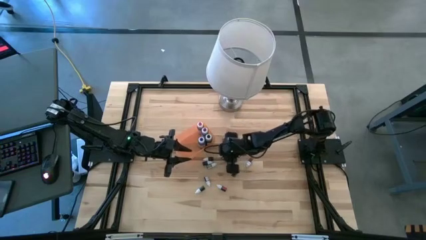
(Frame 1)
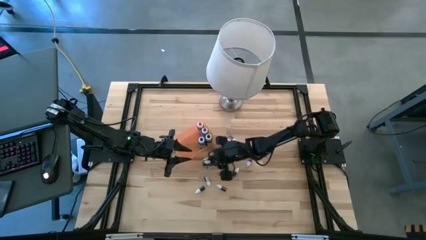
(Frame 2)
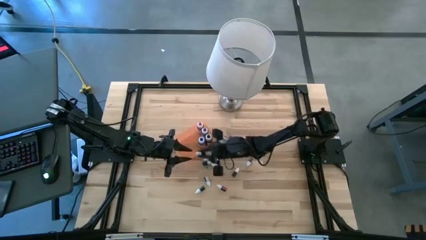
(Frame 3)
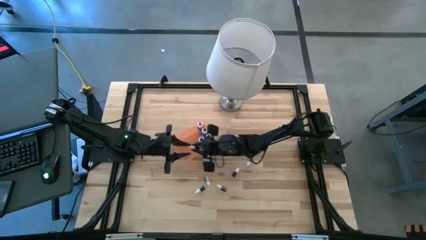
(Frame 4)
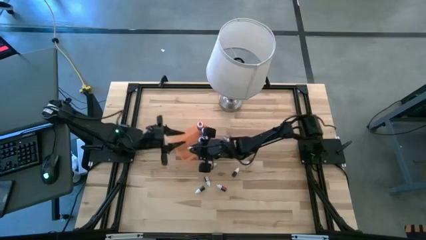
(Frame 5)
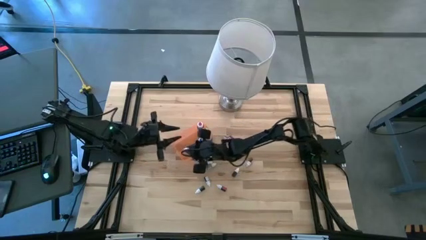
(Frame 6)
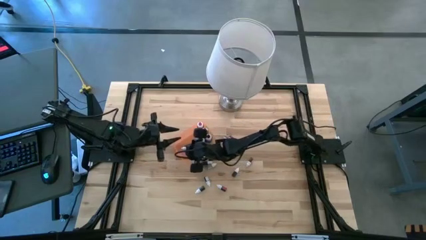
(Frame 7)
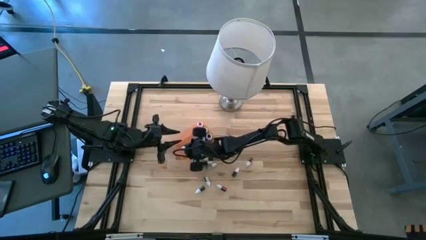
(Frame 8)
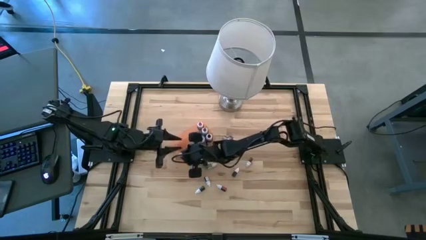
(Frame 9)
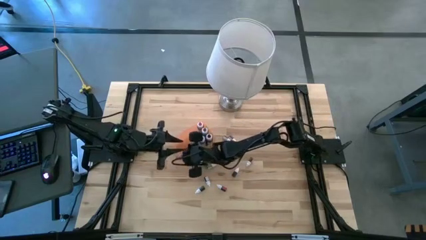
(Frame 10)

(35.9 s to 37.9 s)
Task: Pick & Place food coloring
Put the top small black food coloring bottle into the bin

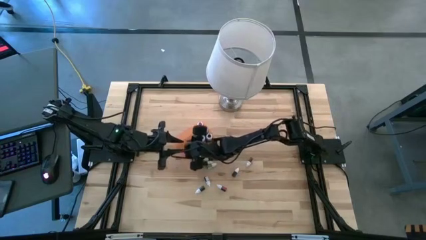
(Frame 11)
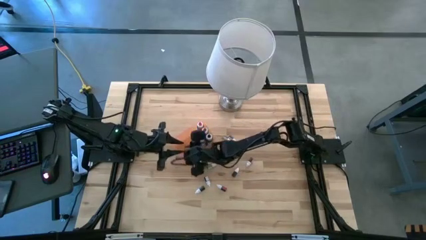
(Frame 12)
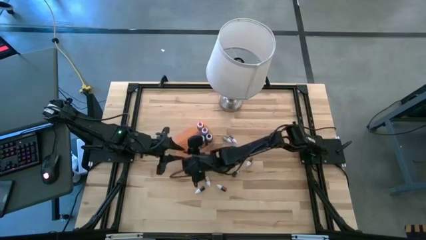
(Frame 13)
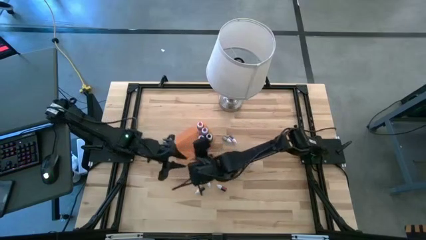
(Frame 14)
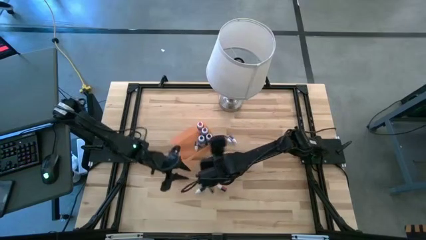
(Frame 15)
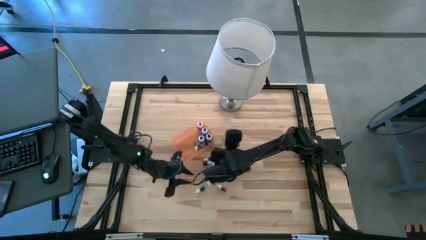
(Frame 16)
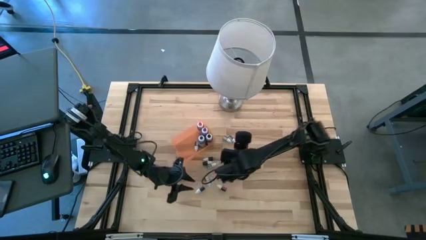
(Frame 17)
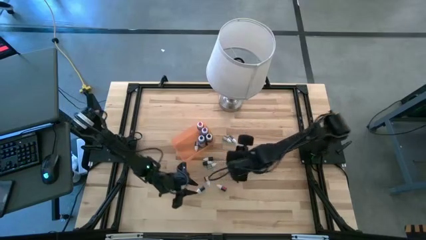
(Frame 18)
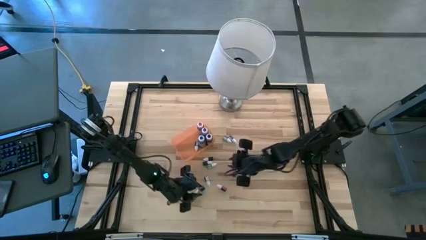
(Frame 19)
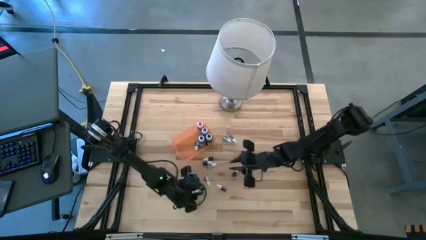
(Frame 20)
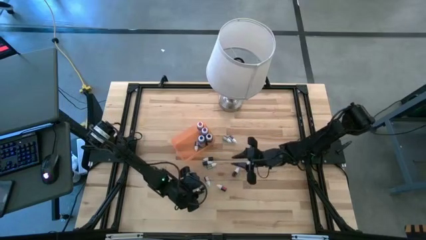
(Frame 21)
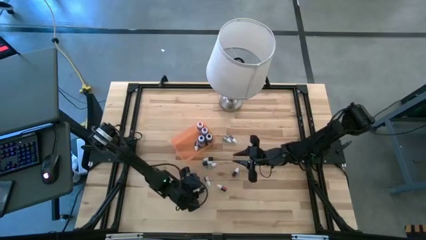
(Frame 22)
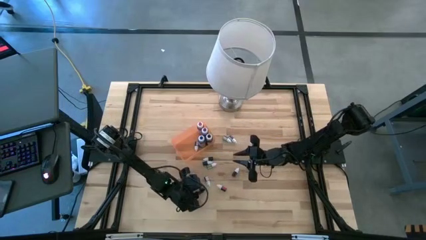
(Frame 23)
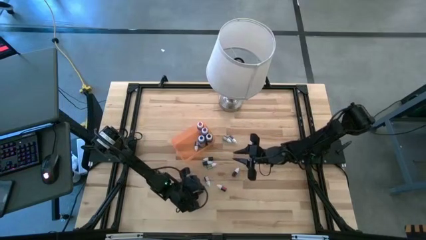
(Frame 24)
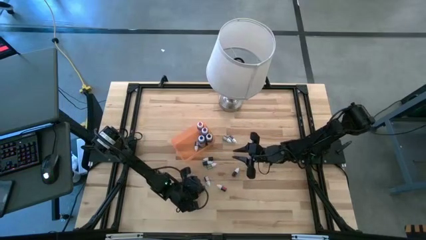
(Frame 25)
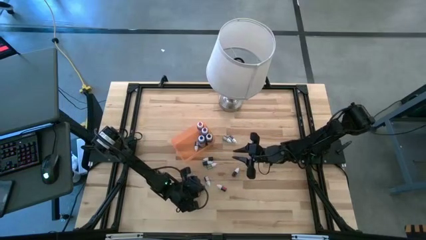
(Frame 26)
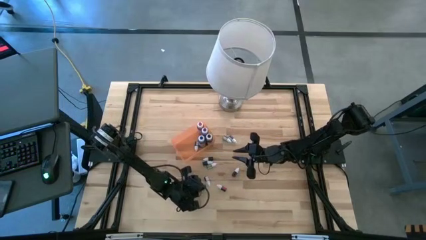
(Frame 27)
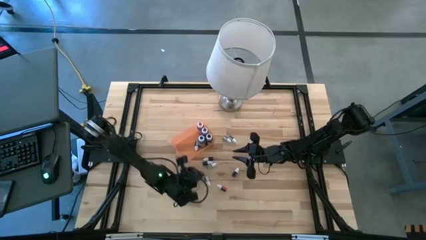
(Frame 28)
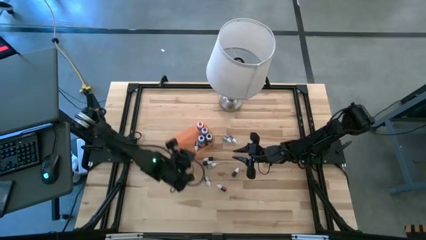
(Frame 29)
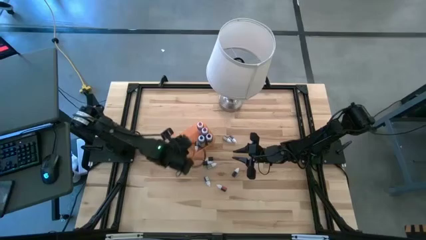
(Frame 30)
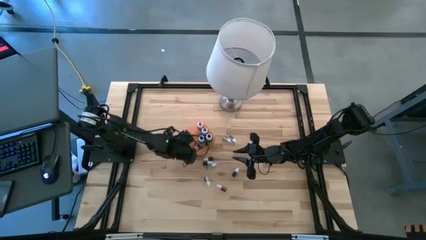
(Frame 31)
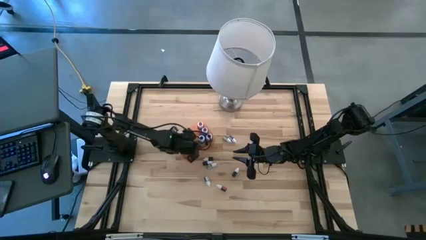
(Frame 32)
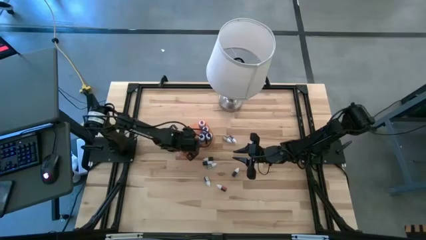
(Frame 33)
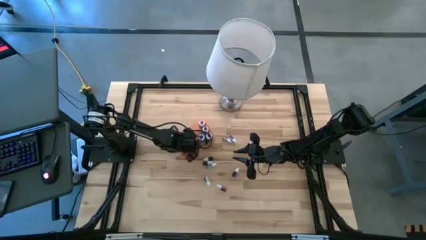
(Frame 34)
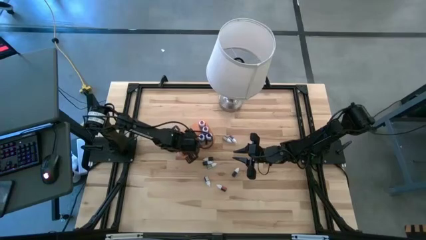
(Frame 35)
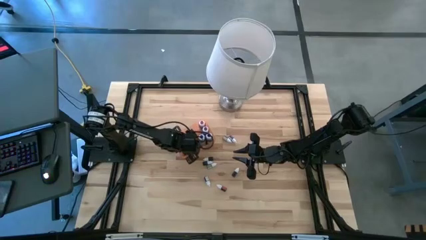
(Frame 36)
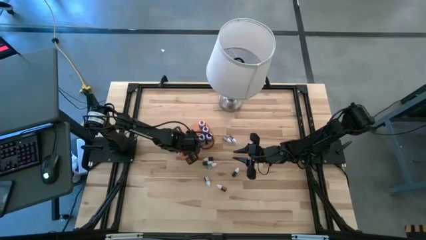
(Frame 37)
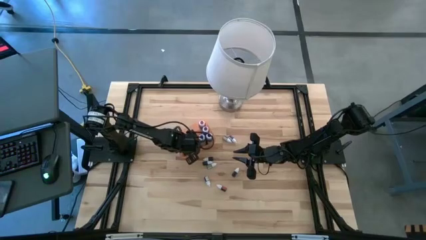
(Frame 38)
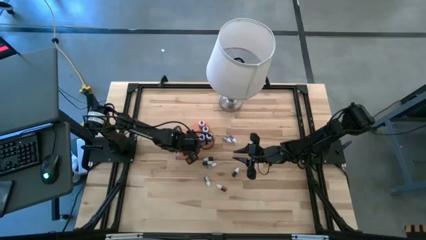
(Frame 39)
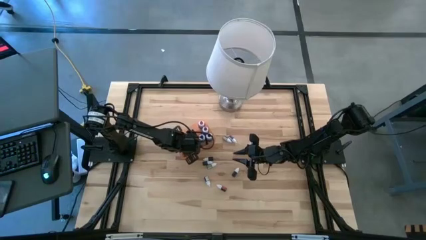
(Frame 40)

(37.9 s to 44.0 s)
Put the bottom small green food coloring bottle into the bin

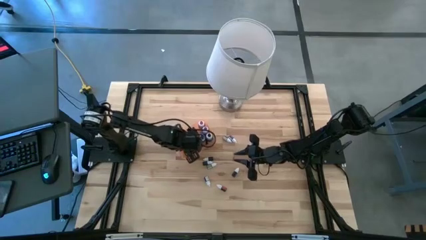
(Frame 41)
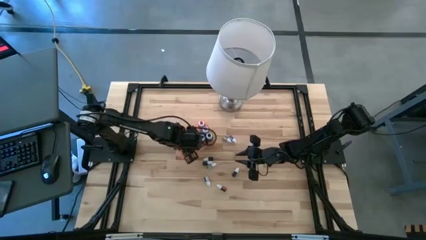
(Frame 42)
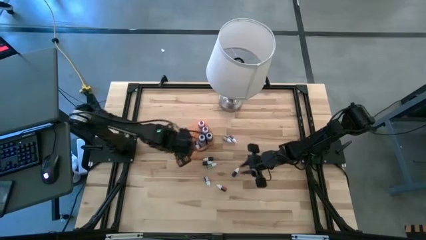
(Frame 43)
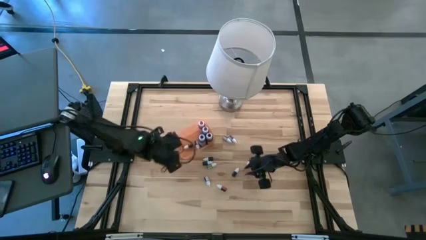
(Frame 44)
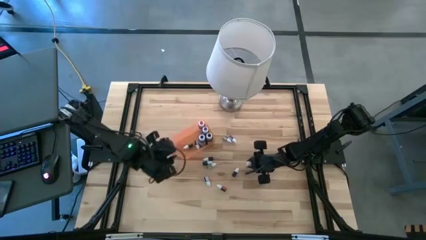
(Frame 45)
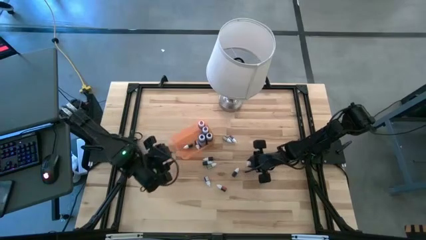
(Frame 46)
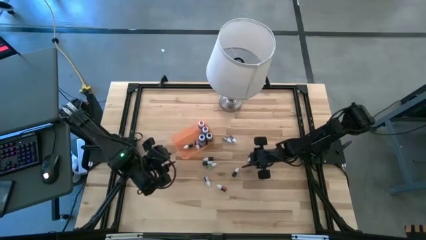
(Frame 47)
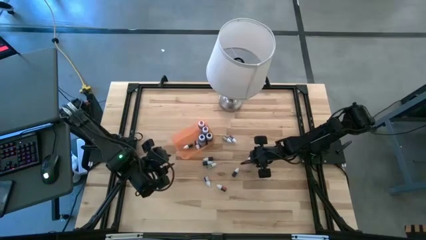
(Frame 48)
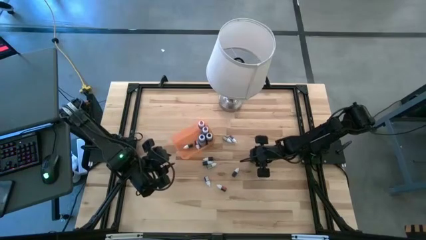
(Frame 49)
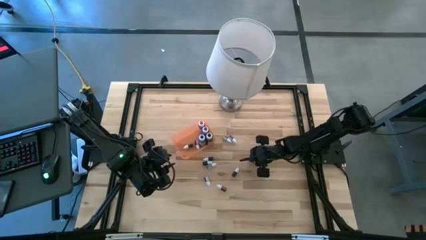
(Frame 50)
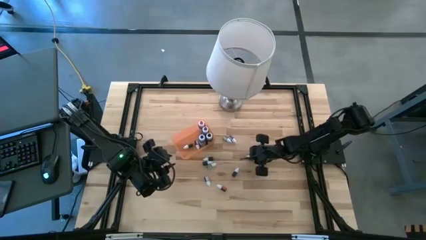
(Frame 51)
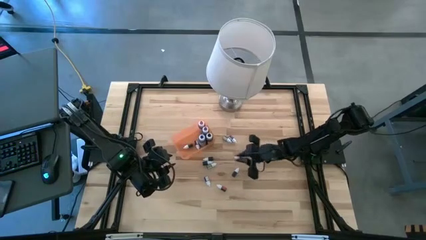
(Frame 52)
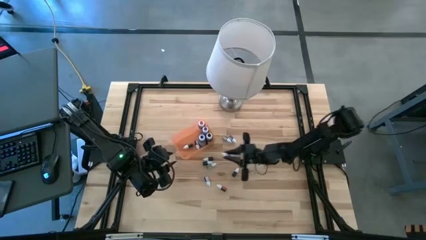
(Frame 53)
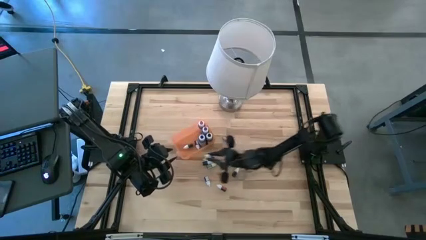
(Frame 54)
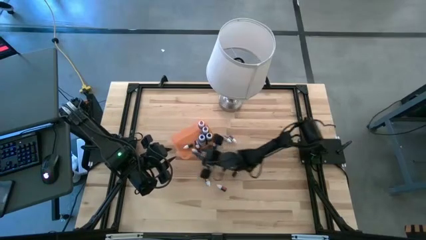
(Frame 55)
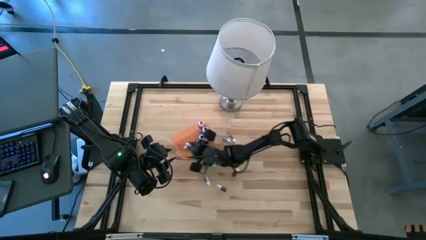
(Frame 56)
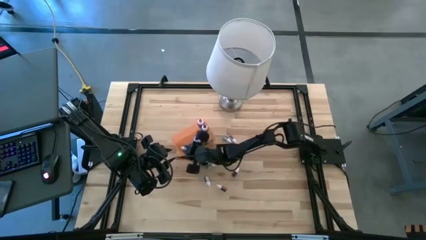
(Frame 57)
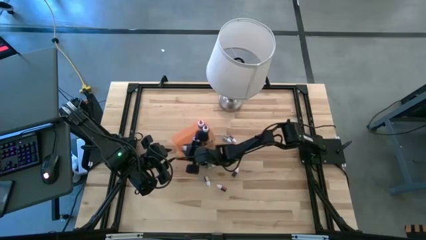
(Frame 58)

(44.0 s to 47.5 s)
Put the top right small red food coloring bottle into the bin

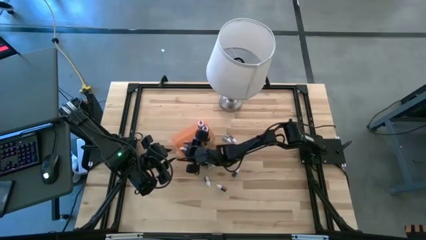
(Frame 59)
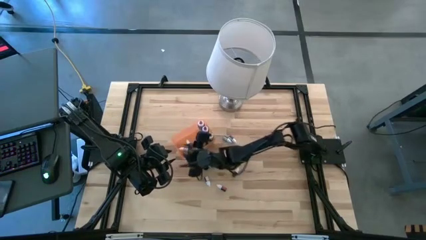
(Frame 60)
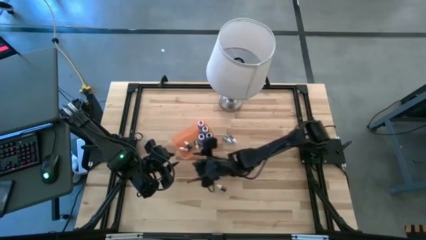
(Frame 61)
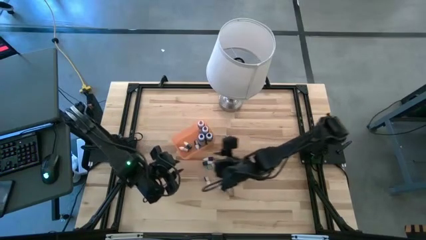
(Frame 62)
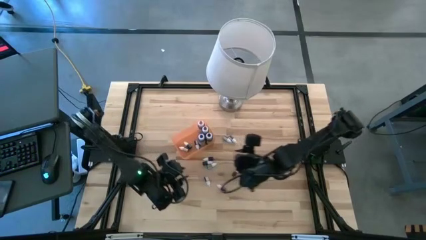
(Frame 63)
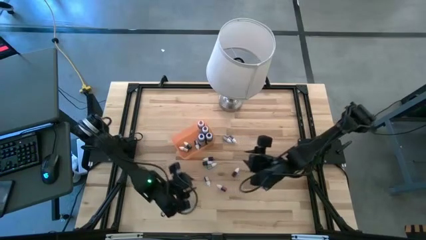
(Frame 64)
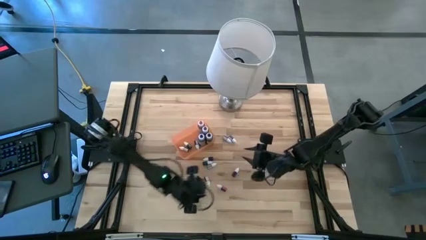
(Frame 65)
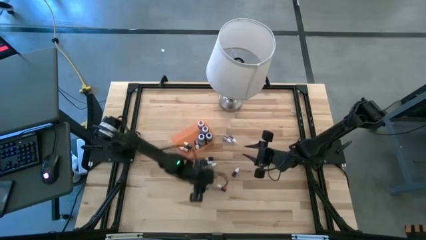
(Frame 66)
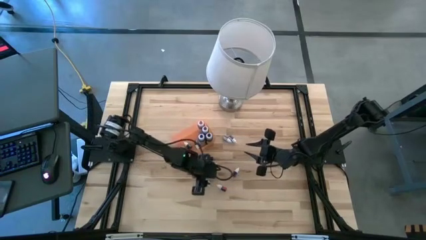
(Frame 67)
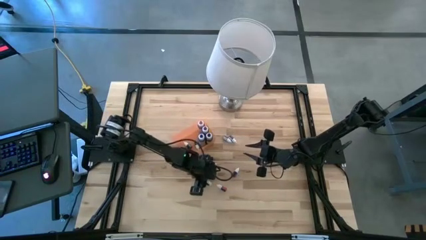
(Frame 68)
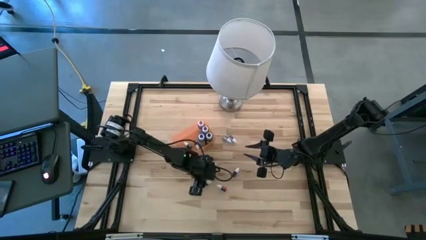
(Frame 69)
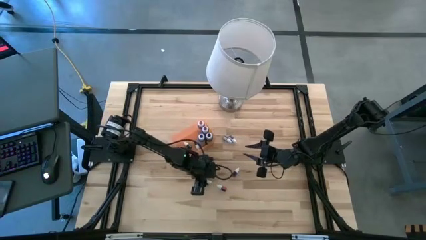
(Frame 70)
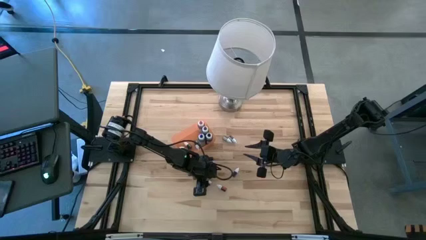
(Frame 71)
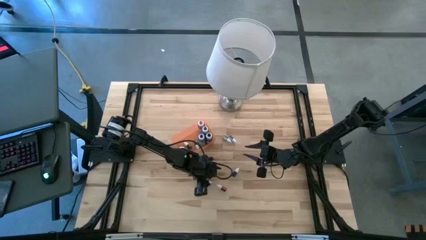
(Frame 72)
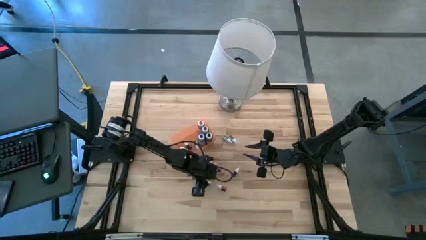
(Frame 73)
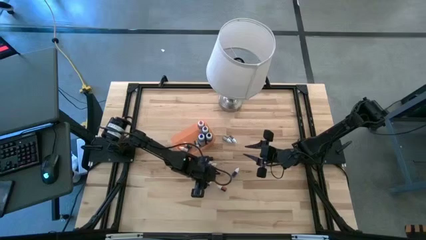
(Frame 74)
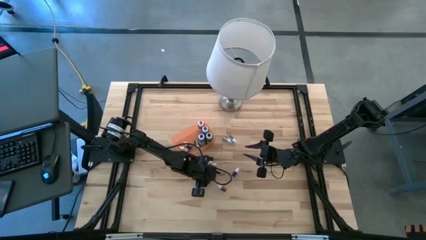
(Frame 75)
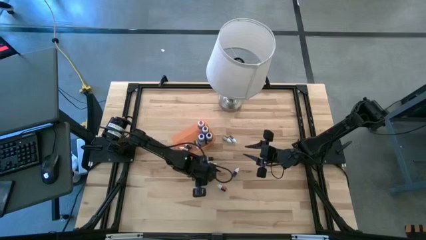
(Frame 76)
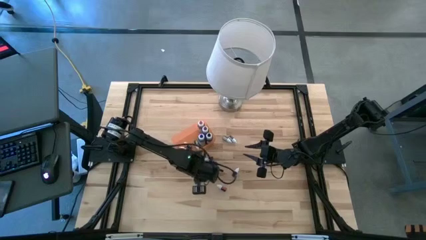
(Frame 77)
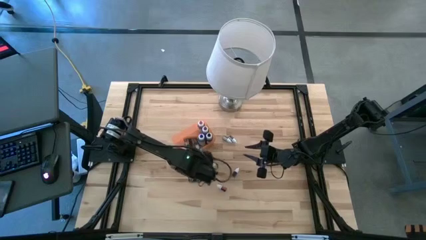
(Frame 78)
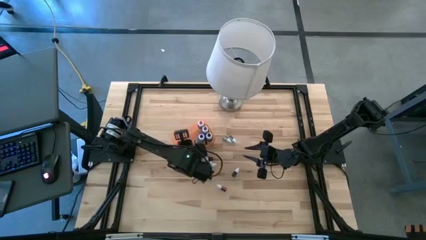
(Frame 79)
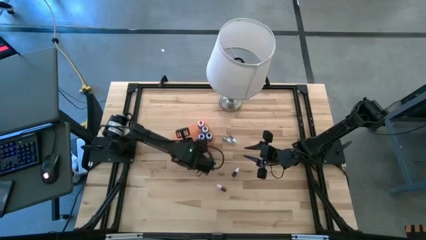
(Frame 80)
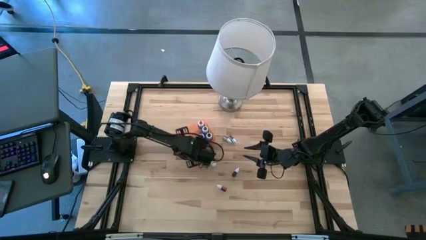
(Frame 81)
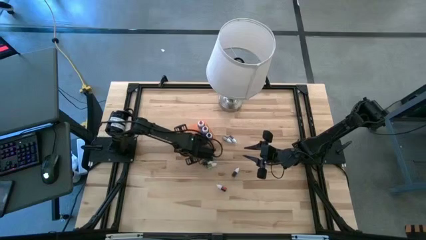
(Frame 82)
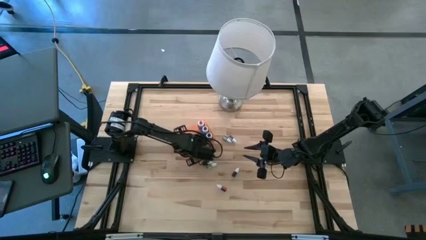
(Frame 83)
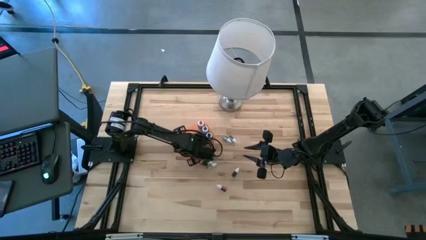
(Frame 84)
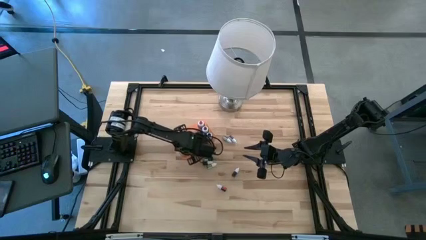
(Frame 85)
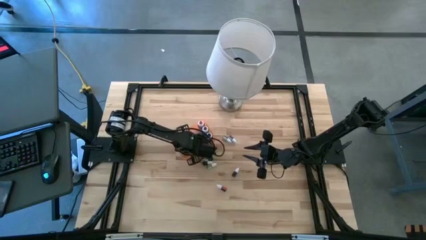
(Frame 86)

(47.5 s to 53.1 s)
Put the small left red food coloring bottle into the bin
